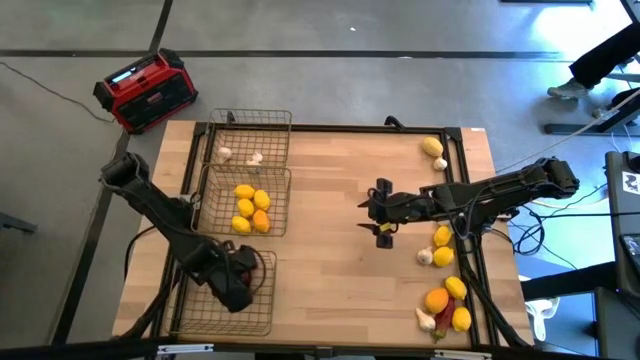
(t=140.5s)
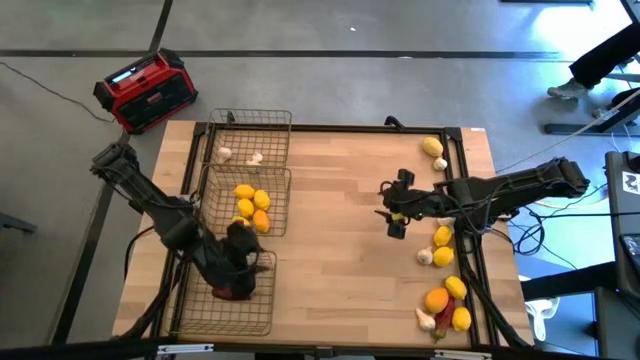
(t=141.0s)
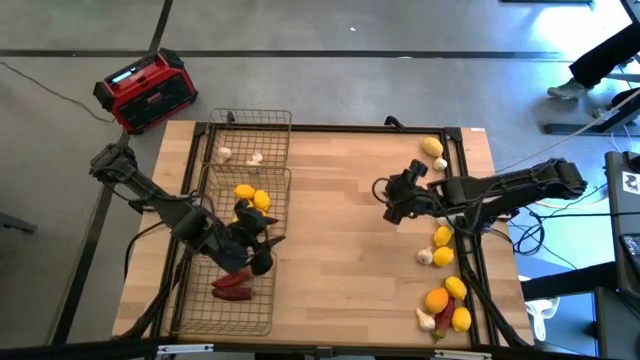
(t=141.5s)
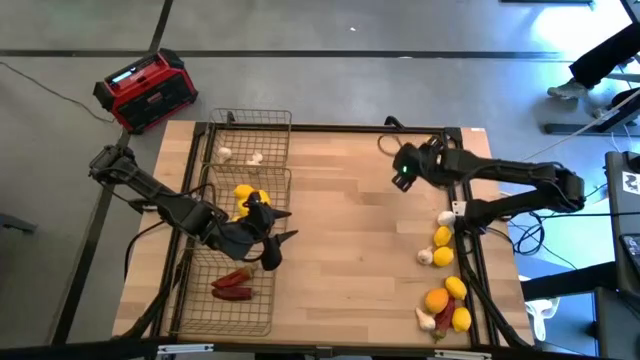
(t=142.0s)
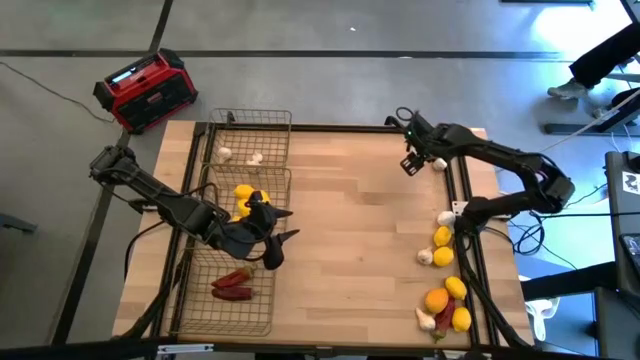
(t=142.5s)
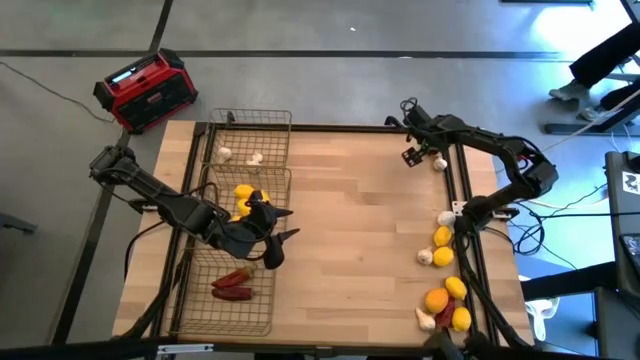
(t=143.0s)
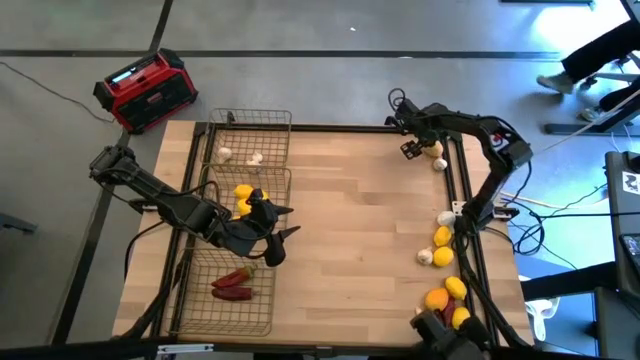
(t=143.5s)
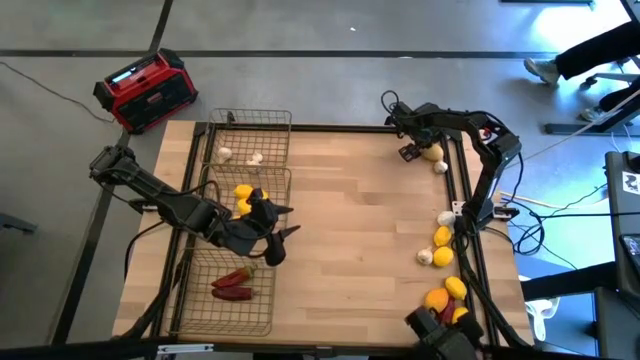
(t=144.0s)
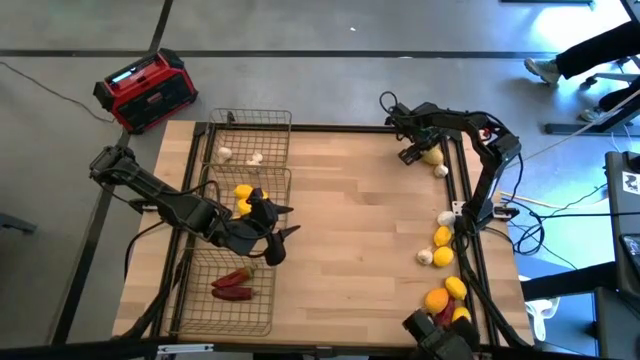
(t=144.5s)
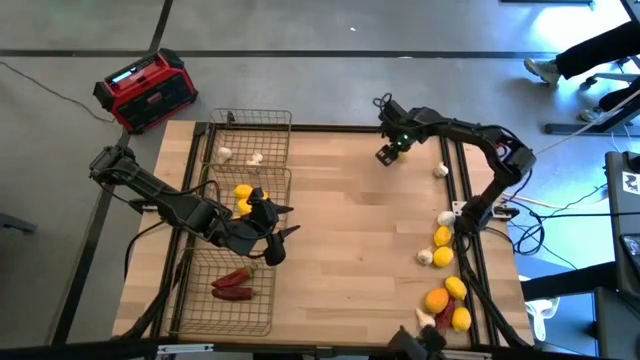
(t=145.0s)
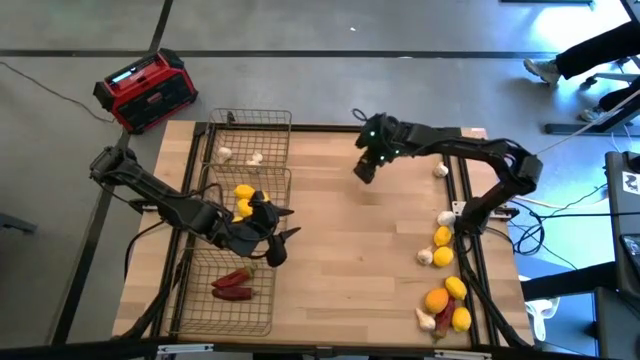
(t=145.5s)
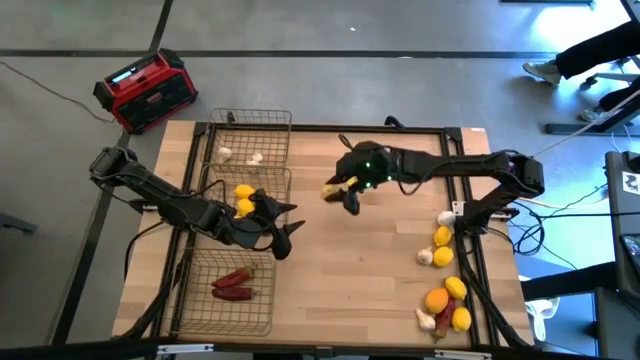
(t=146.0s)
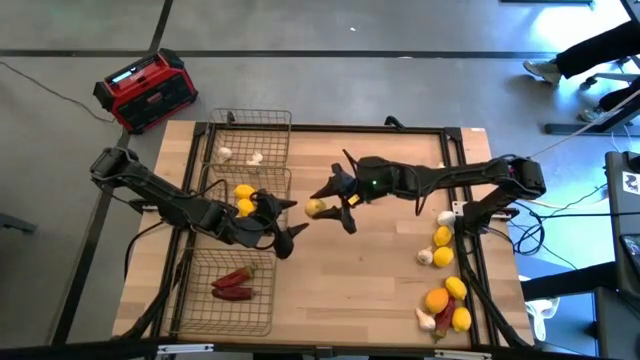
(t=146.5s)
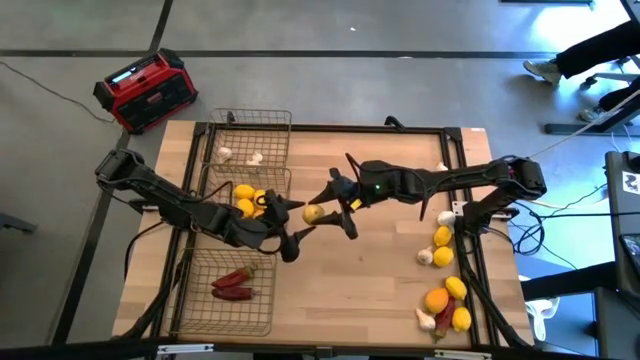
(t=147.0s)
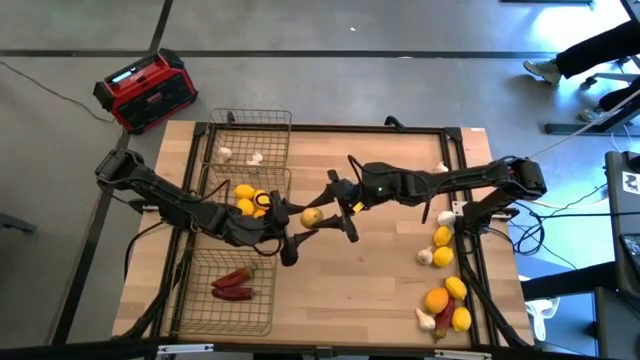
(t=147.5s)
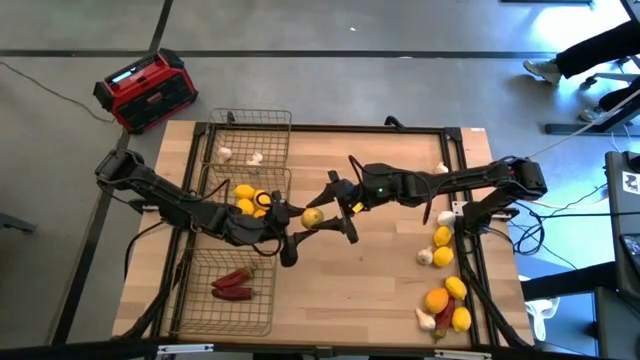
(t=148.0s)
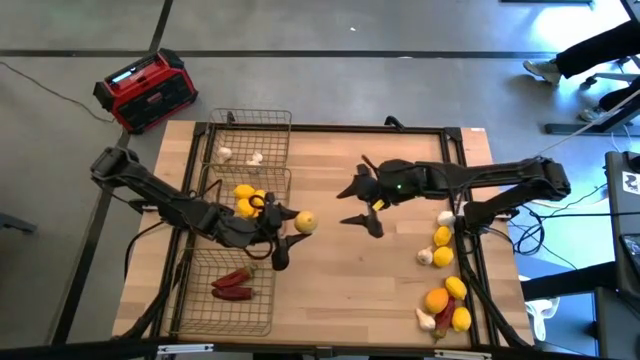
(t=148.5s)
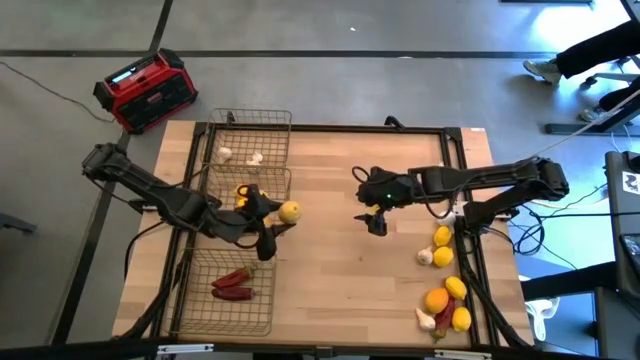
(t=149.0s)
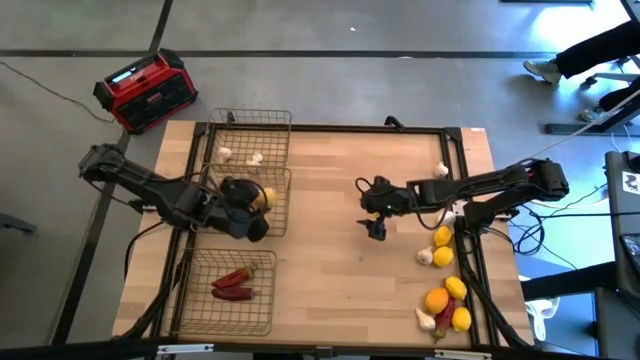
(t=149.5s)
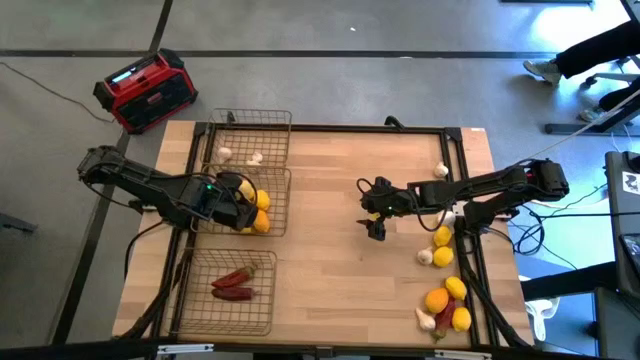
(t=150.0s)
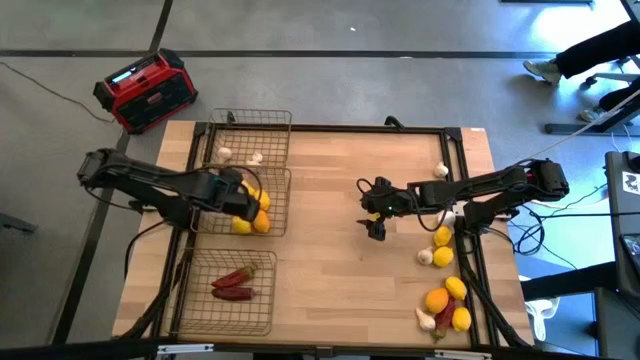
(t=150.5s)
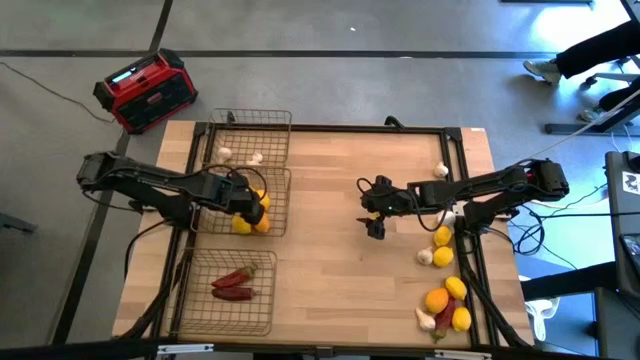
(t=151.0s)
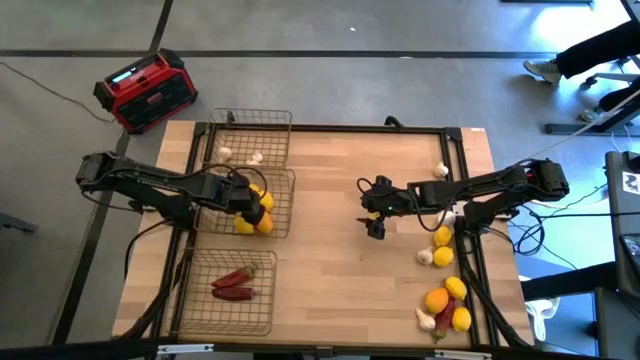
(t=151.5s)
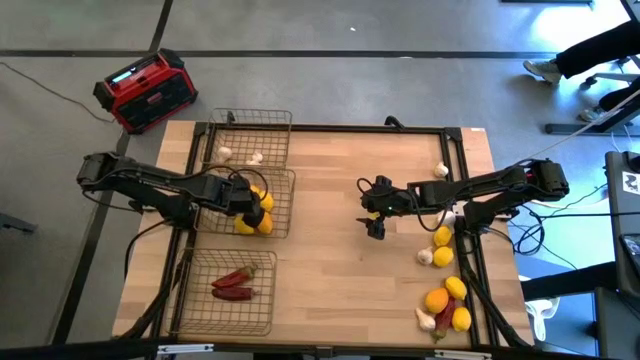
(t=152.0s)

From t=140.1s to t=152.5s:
Task: Sort produce into baskets
Put the lemon in the middle wire basket

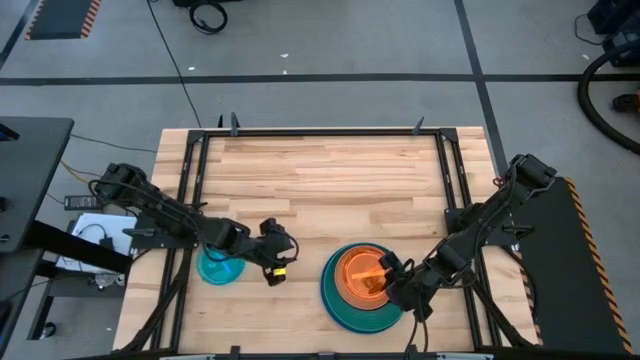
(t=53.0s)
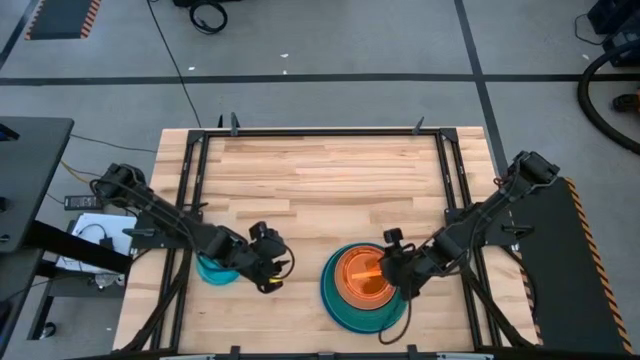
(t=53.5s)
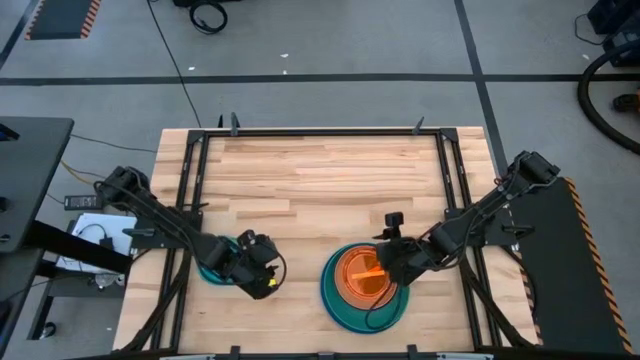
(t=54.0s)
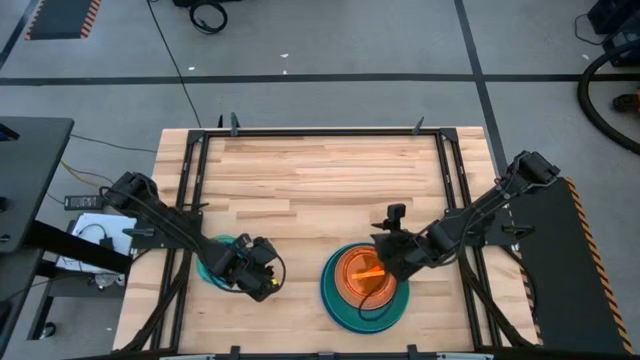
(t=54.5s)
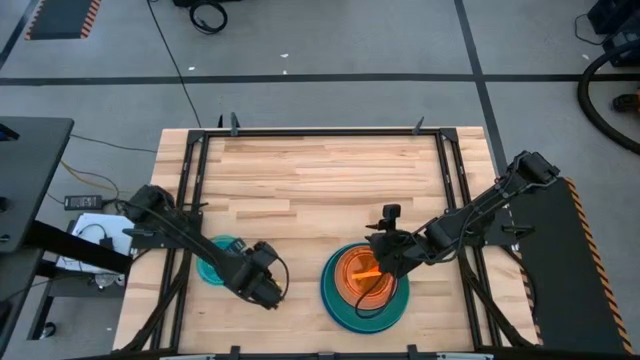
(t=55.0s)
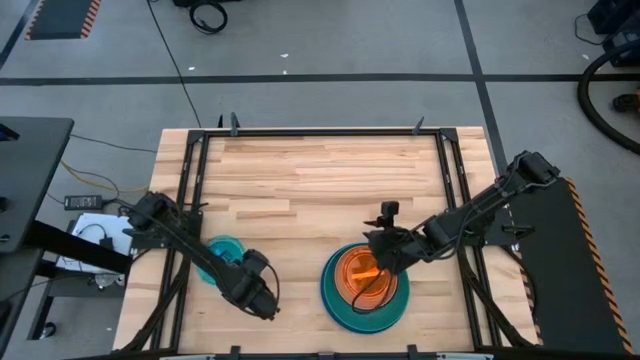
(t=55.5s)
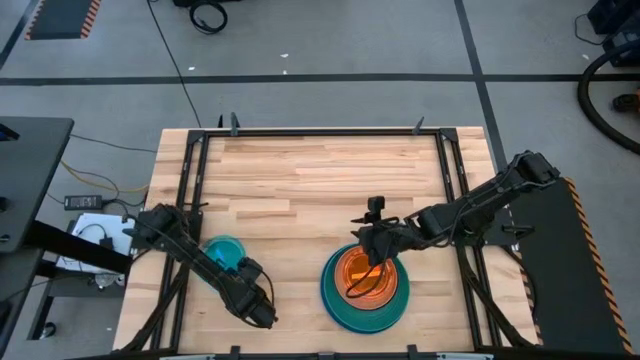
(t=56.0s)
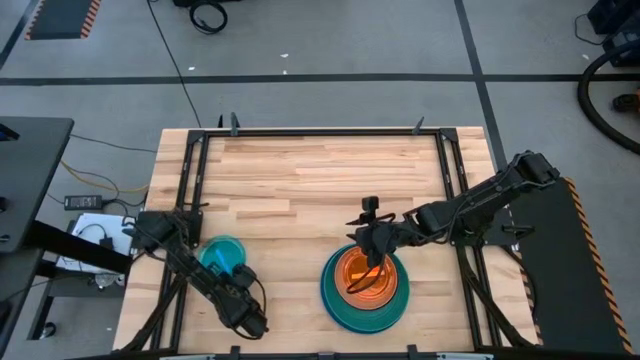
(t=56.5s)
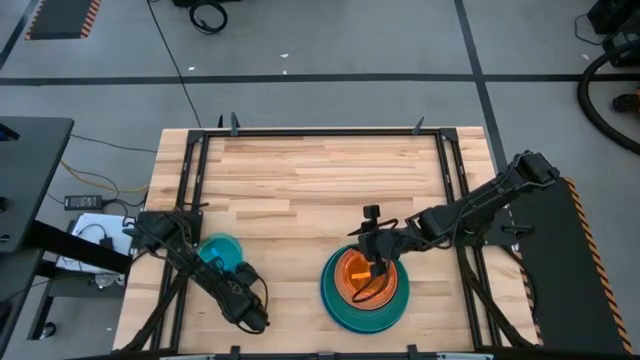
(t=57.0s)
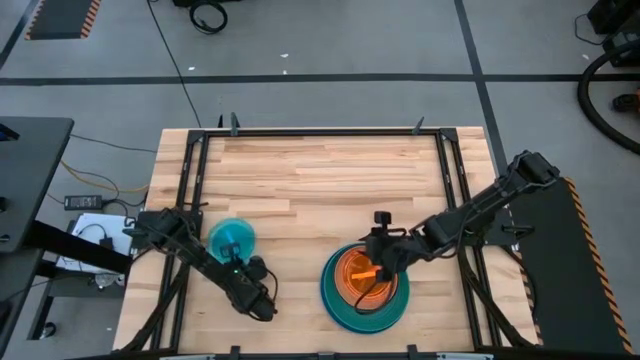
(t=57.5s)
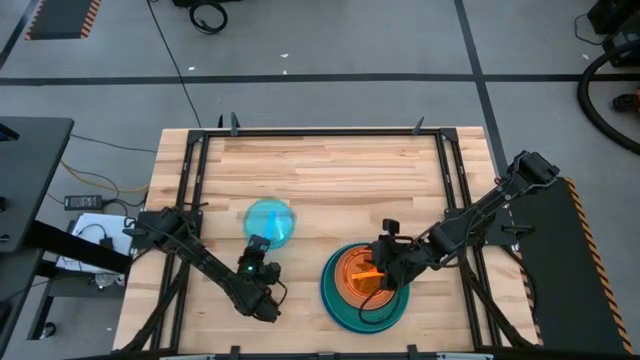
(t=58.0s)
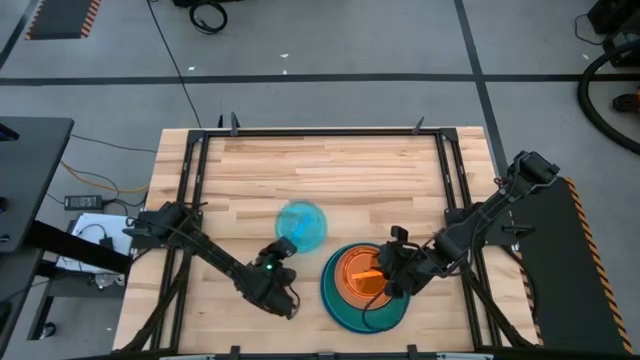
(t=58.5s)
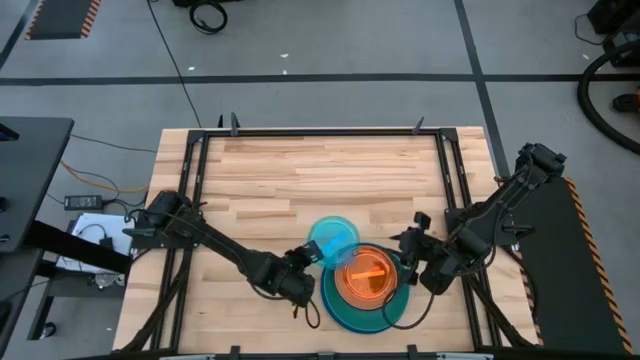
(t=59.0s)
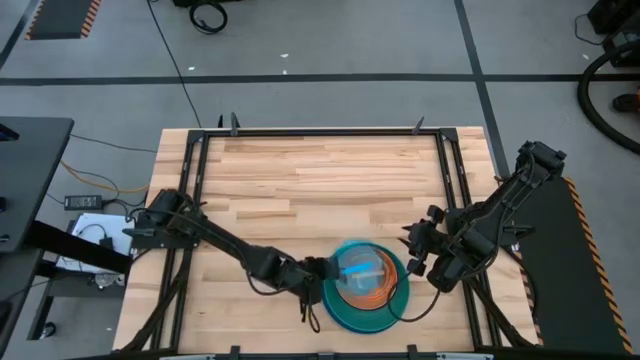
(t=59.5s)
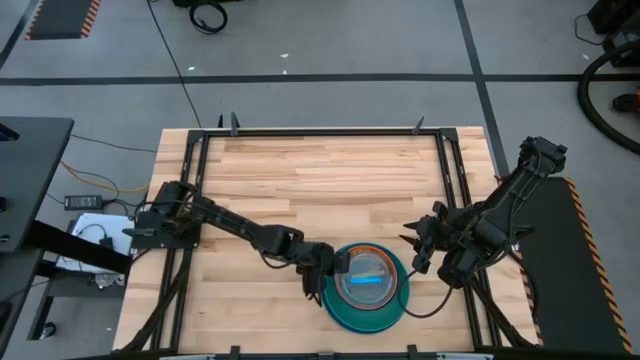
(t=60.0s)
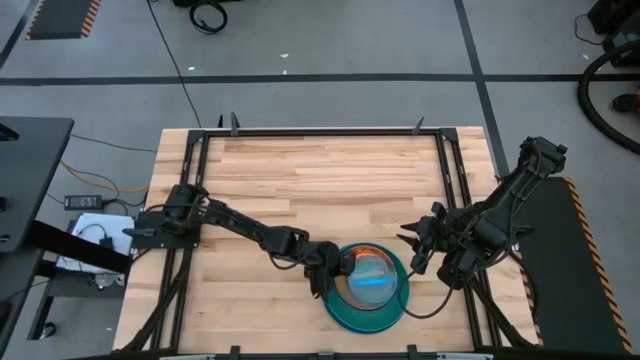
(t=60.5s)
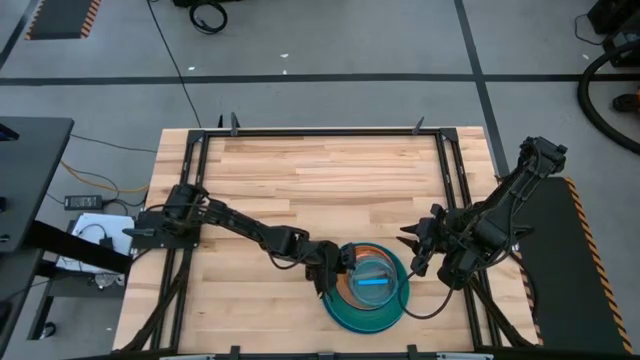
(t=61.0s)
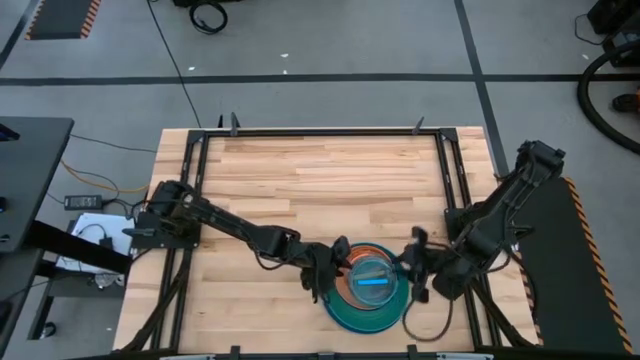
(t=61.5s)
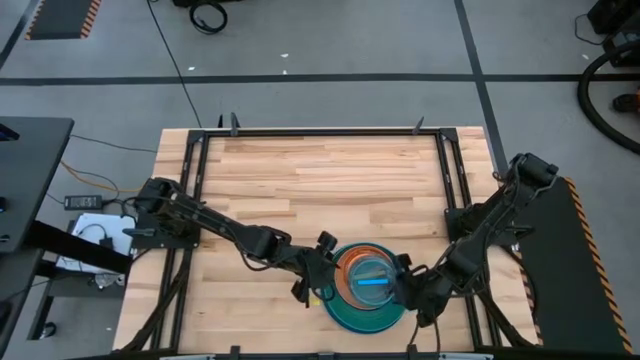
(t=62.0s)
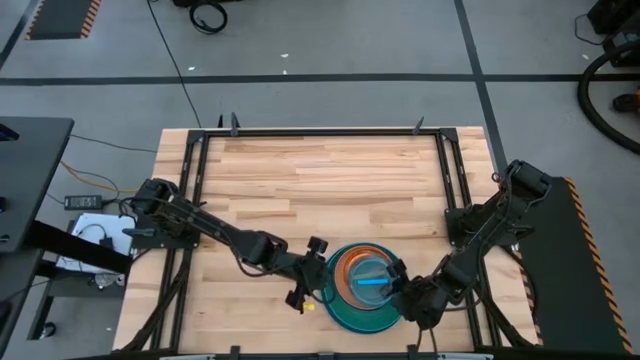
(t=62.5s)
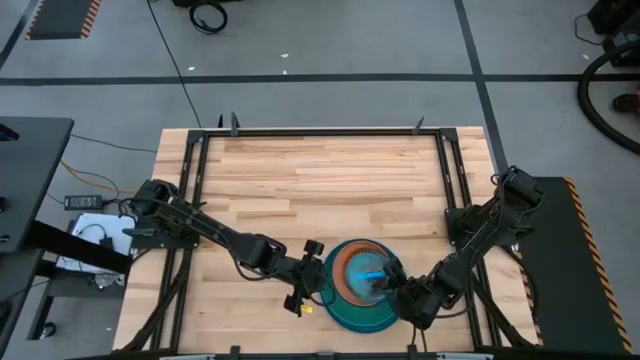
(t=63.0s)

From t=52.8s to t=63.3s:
Task: Stack plastic plates
Stack the transparent blue plate on the top of the transparent orange plate
